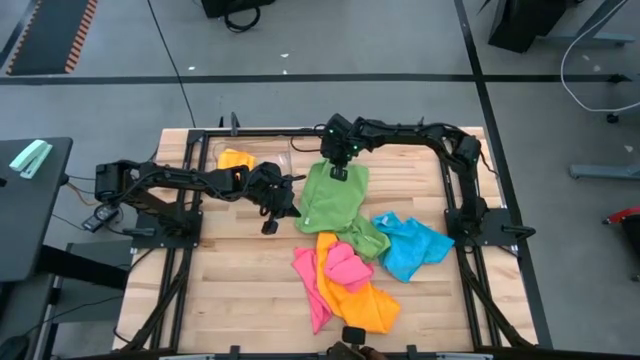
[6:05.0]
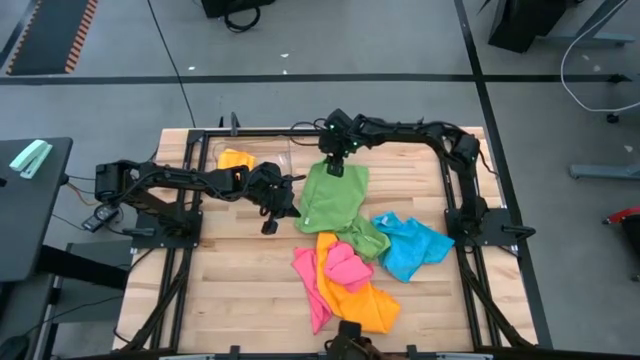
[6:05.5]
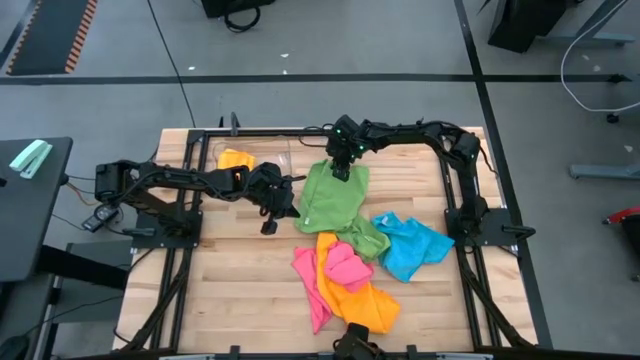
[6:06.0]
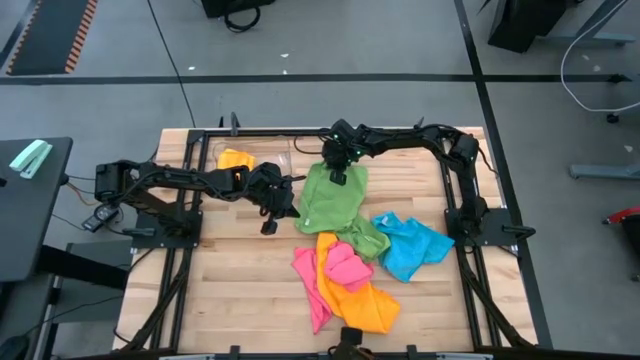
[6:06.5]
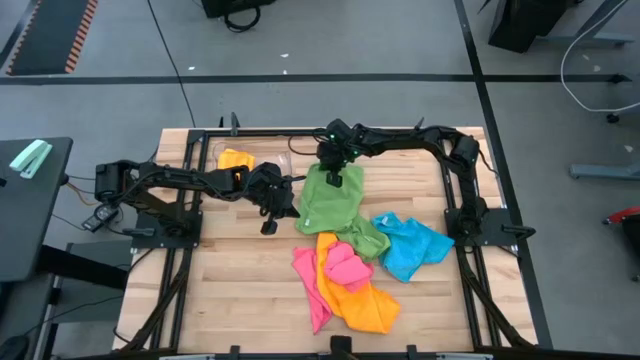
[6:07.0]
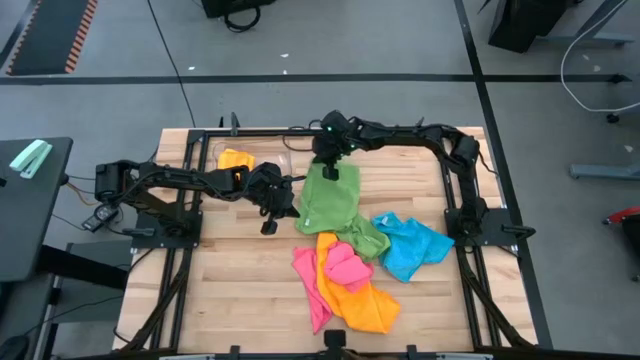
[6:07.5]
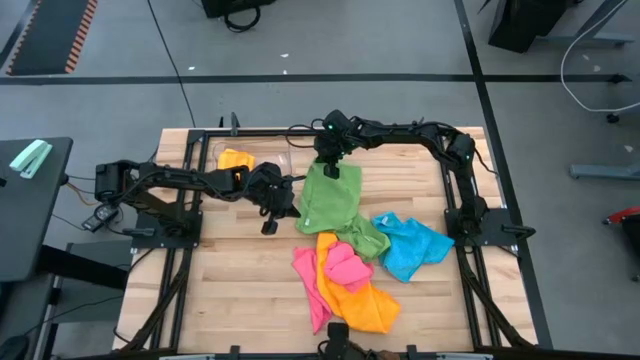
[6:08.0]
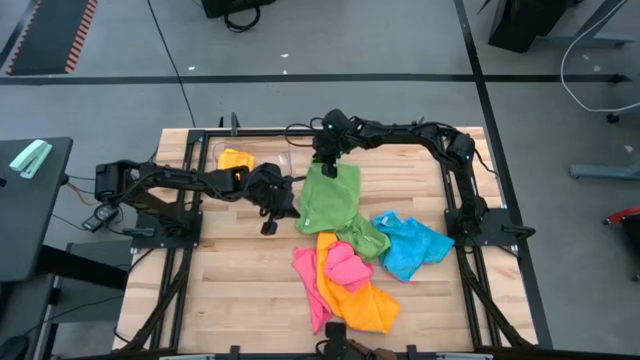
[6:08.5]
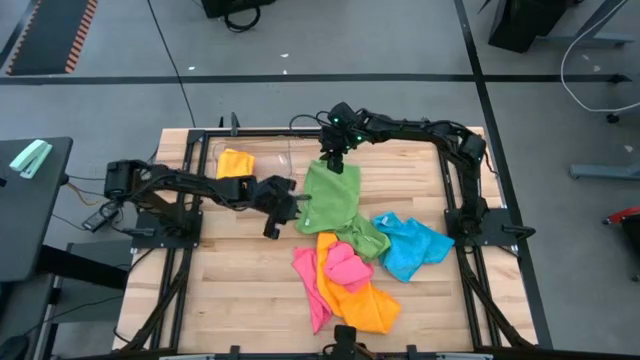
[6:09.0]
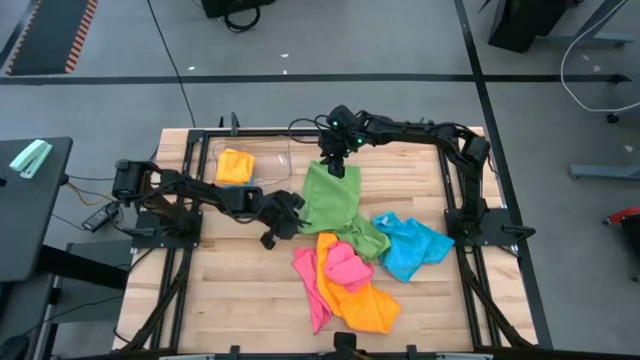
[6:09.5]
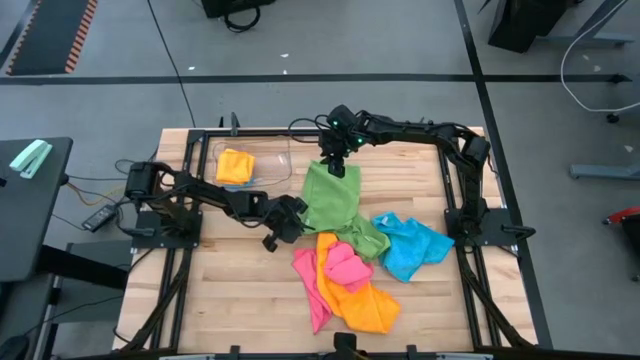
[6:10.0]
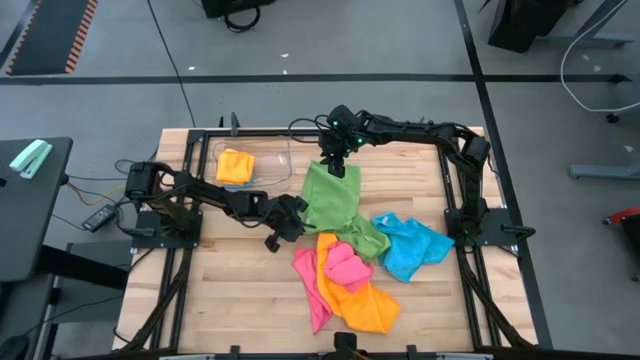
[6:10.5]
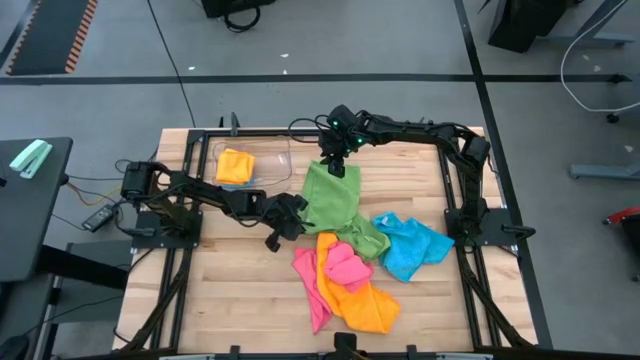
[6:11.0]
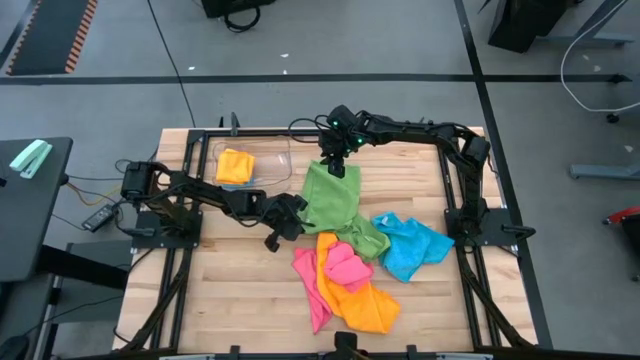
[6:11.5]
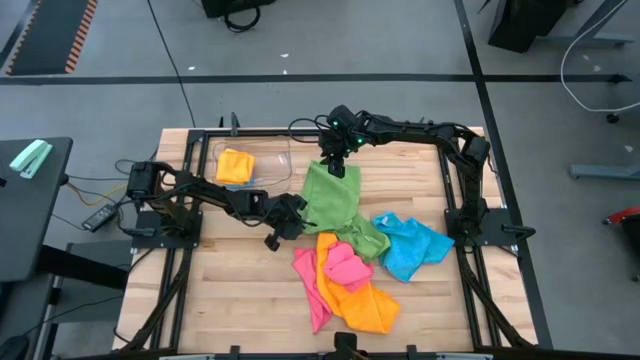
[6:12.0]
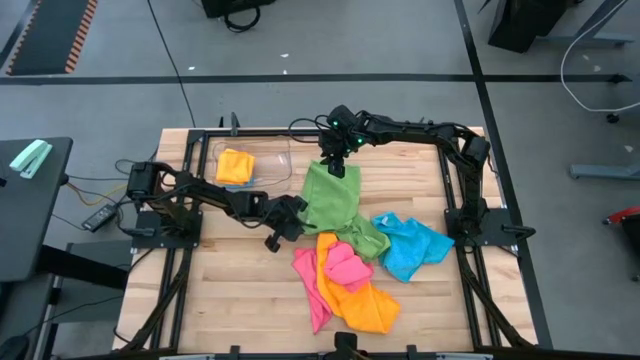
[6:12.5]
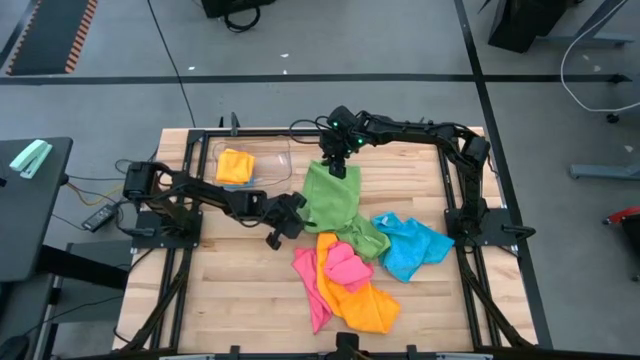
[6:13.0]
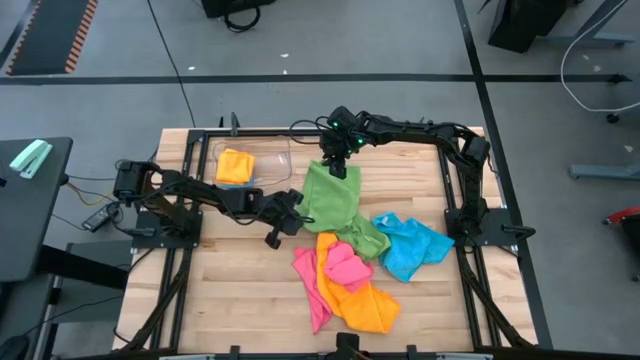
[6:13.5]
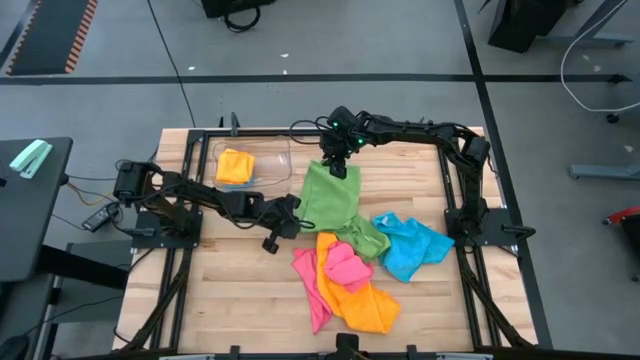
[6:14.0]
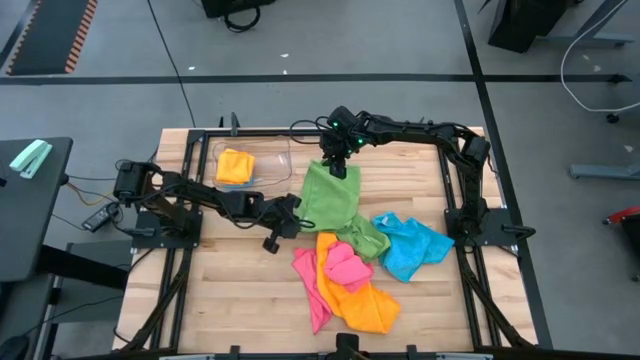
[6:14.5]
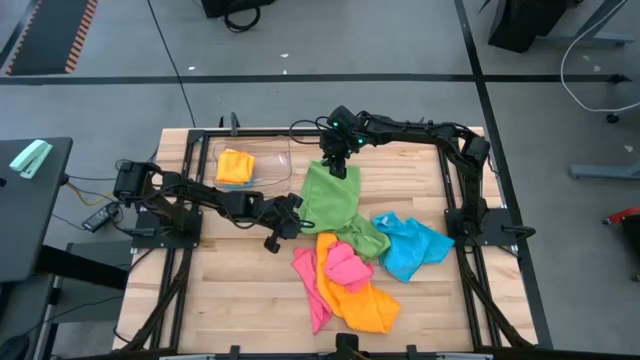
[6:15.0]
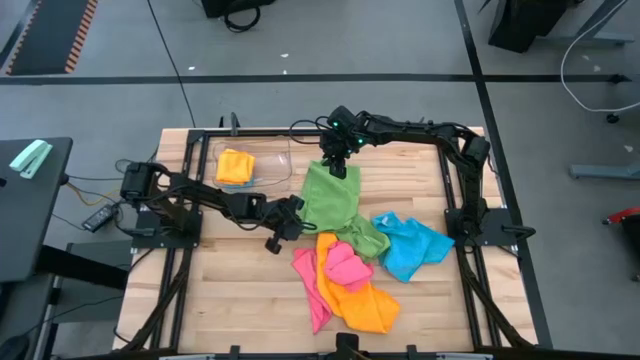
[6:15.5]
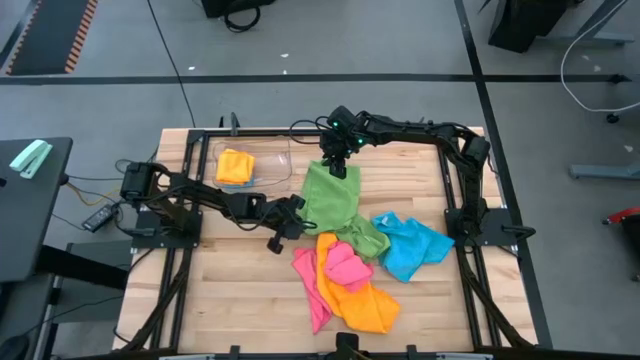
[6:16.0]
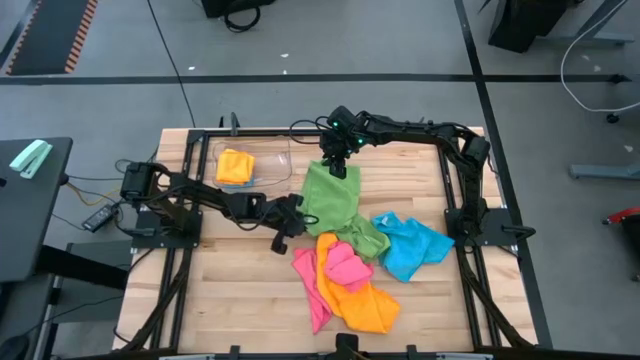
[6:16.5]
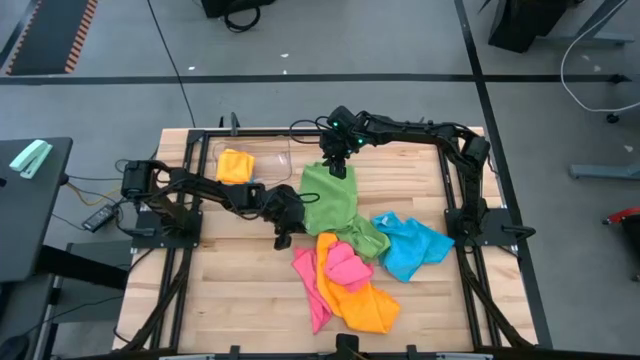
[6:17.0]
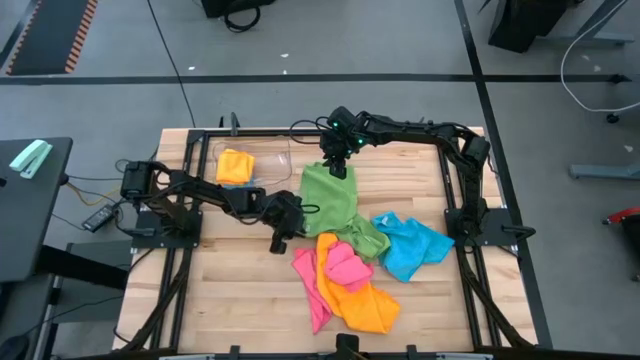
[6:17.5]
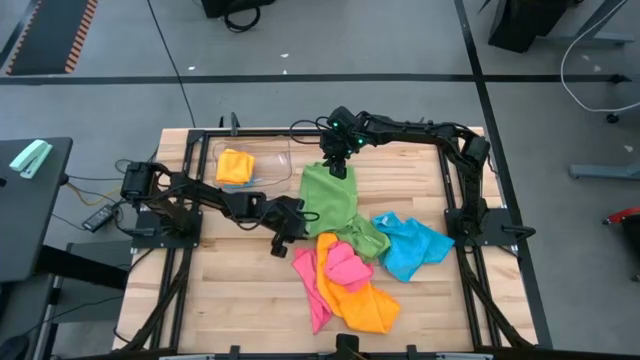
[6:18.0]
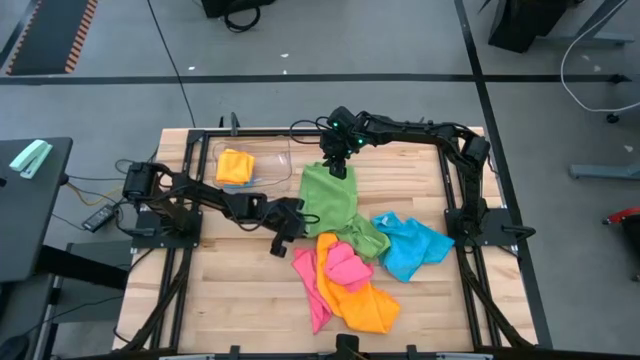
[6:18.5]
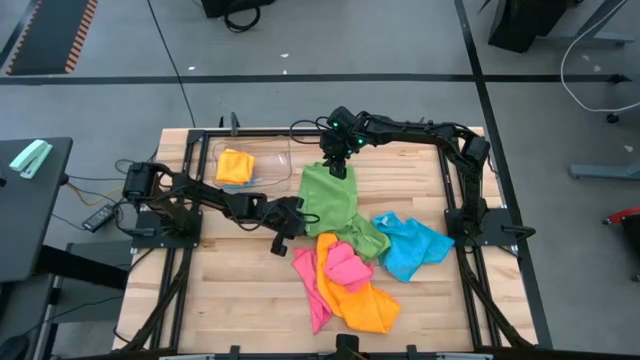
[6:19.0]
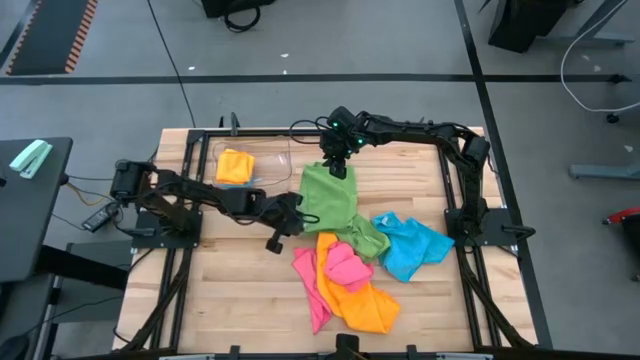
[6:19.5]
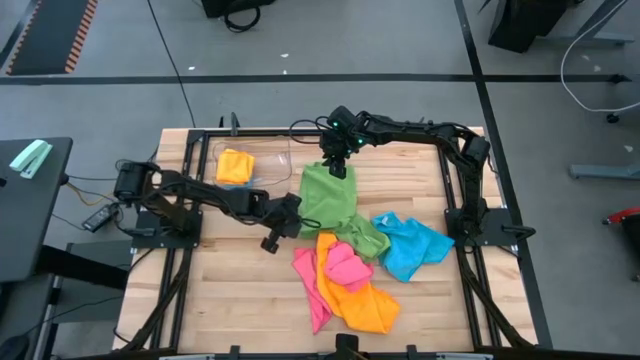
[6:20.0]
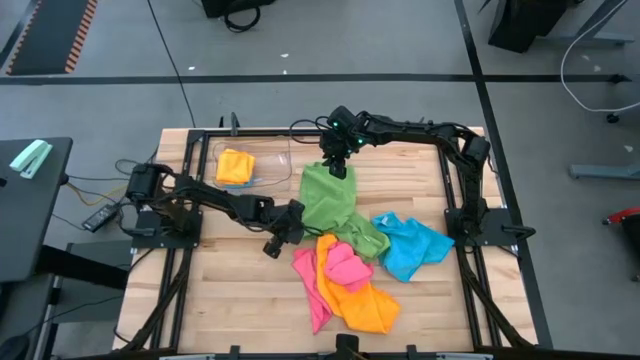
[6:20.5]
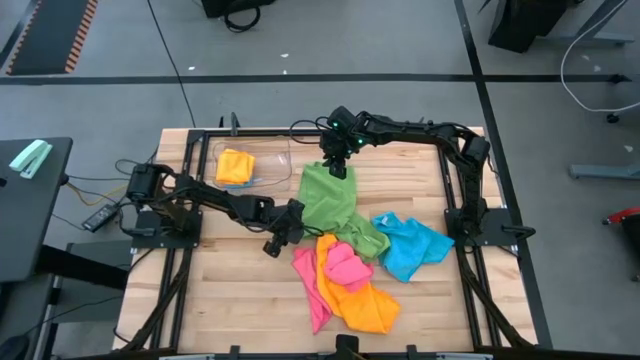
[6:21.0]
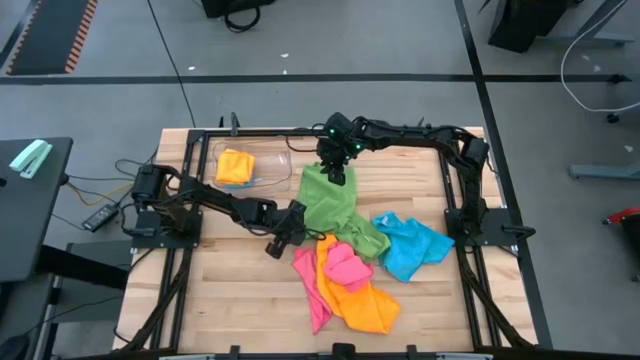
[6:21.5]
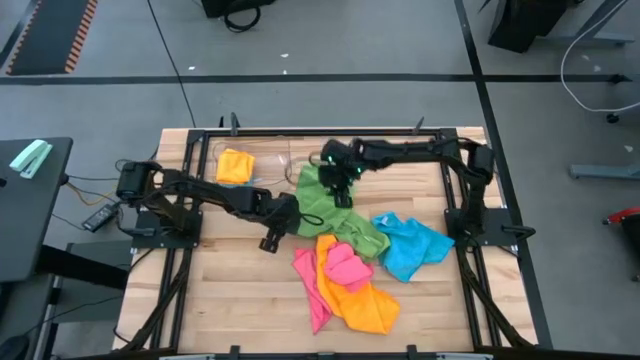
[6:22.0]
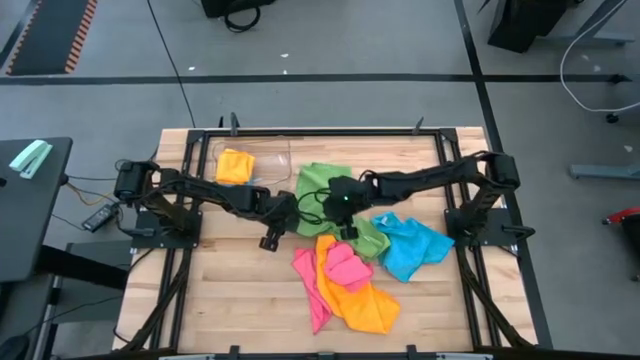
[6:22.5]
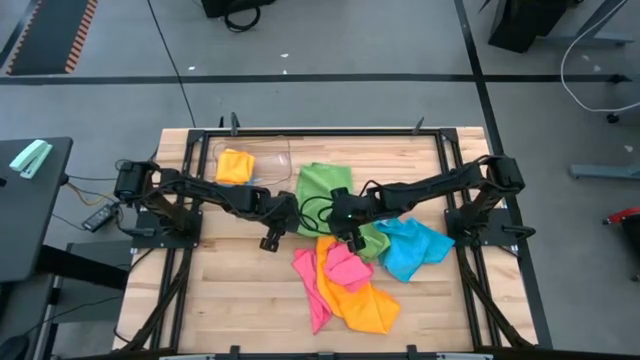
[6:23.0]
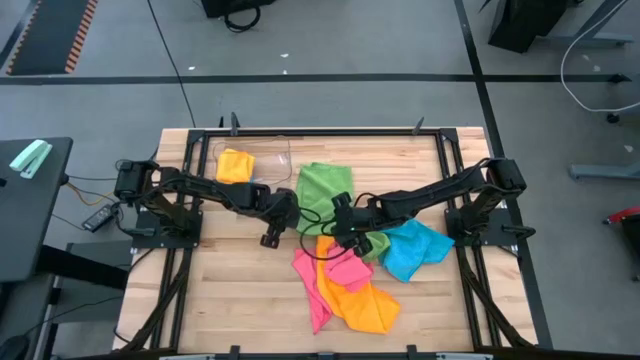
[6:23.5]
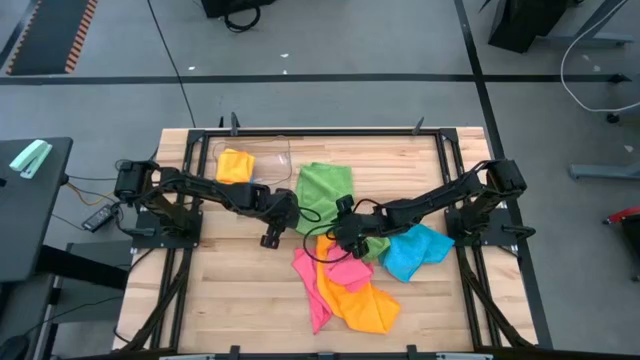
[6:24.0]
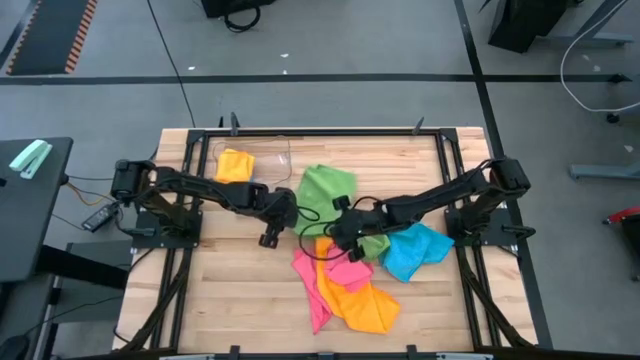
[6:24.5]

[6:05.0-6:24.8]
Task: Fold microfiber towels
Fold the left green microfiber towel

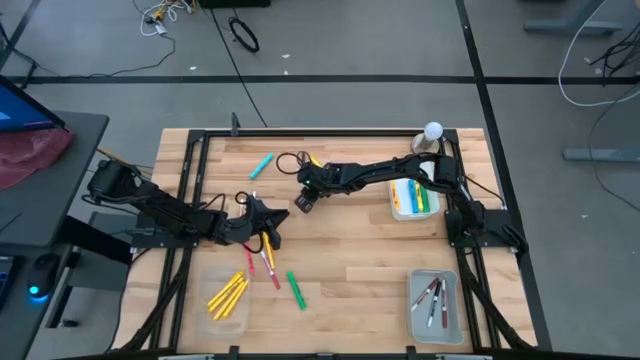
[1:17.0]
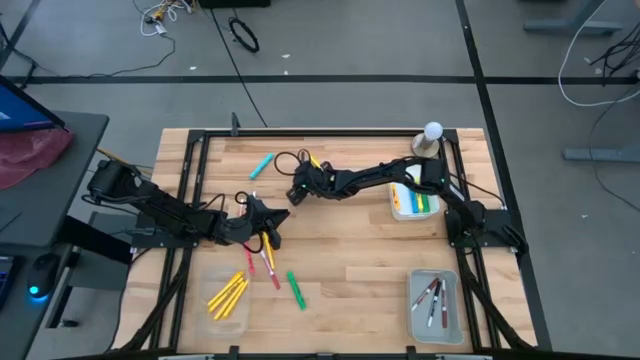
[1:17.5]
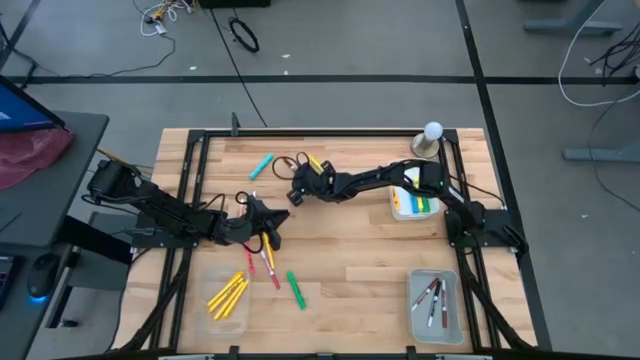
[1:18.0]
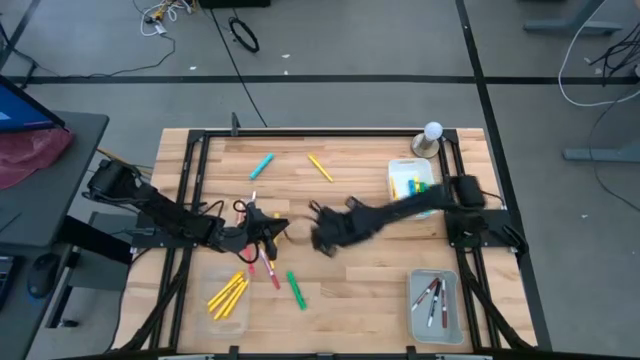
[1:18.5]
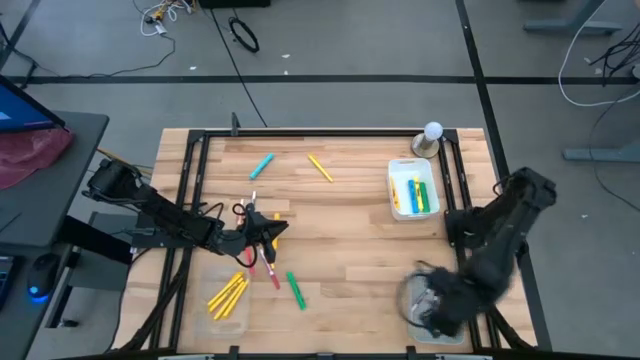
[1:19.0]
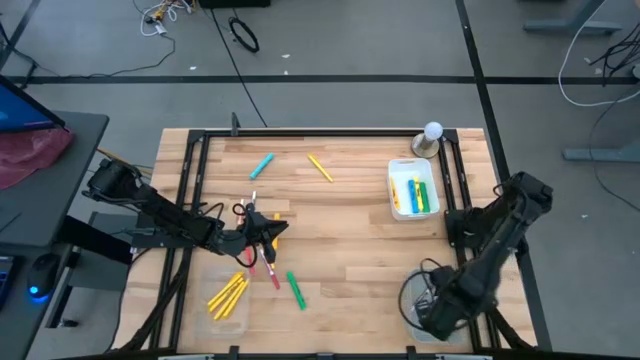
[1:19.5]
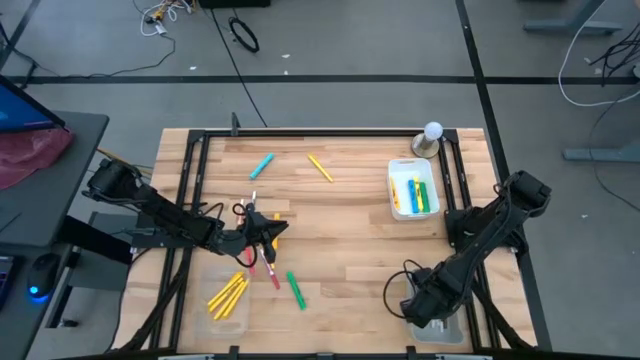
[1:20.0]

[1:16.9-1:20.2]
Task: Pick & Place Markers
Put the brown marker into the gray bin
